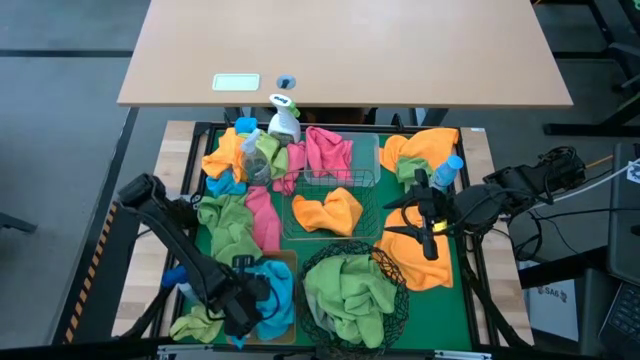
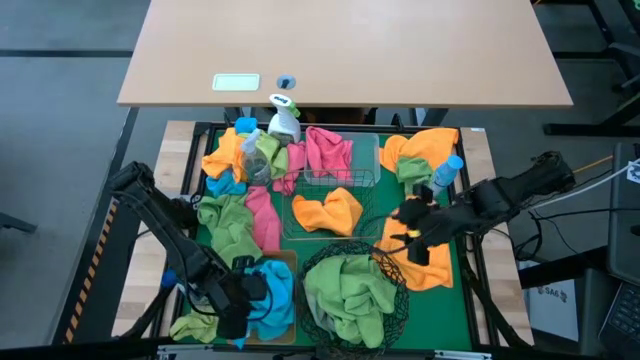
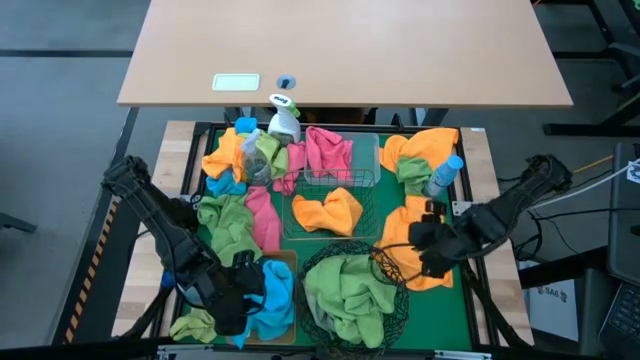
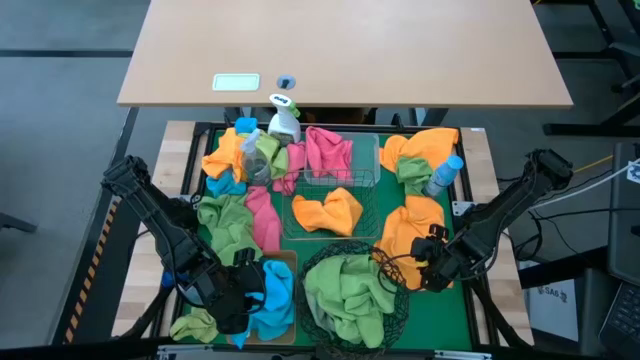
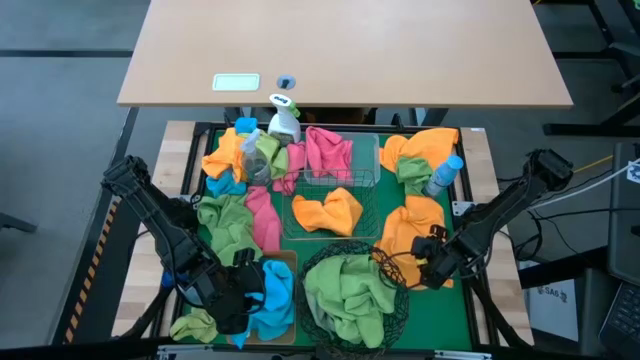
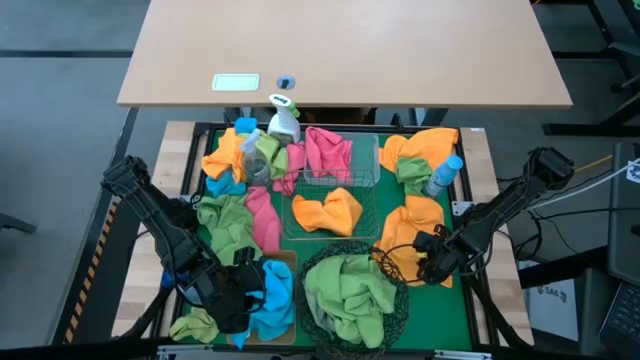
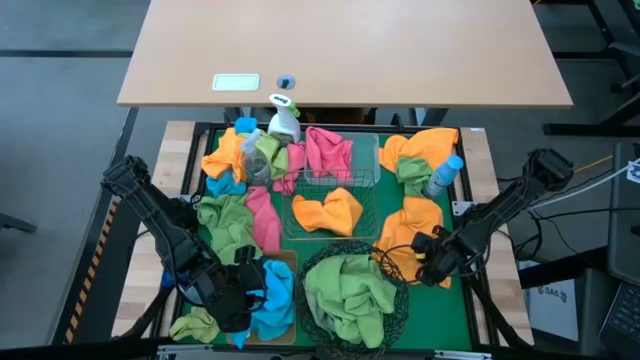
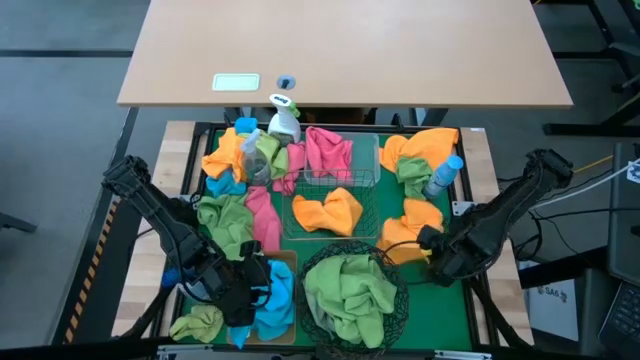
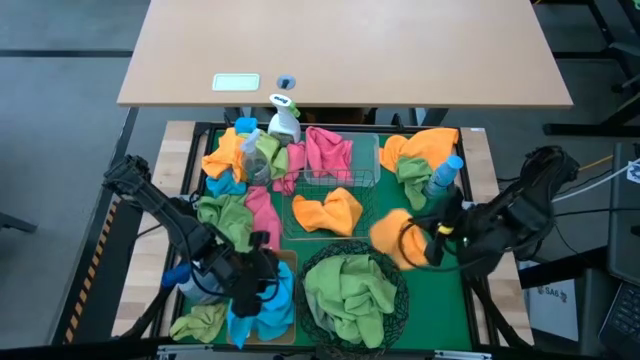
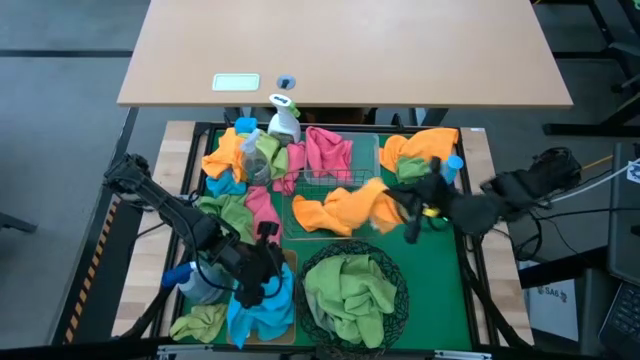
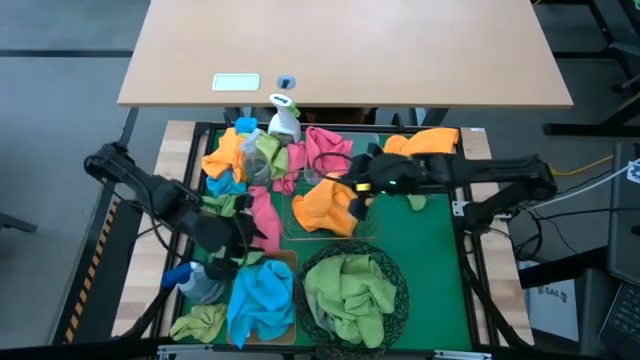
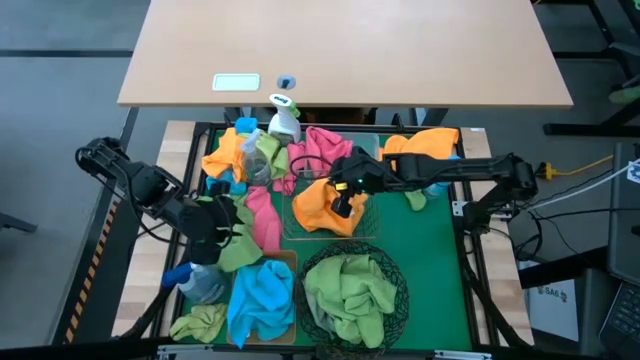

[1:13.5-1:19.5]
Task: Sort microfiber towel by color & place in baskets
Put the orange microfiber towel into the gold wire basket

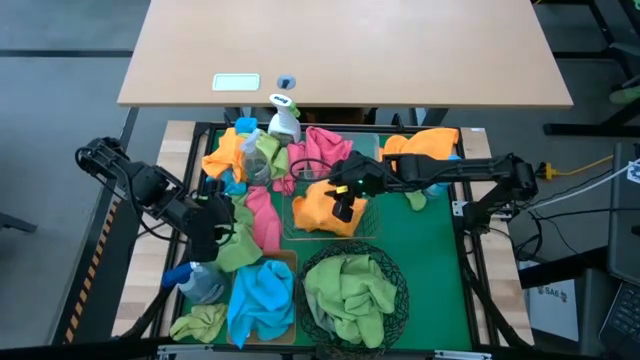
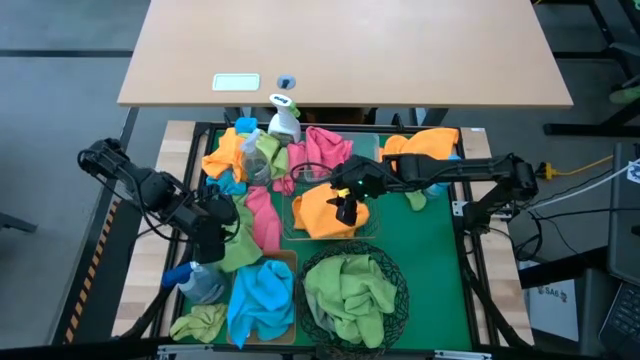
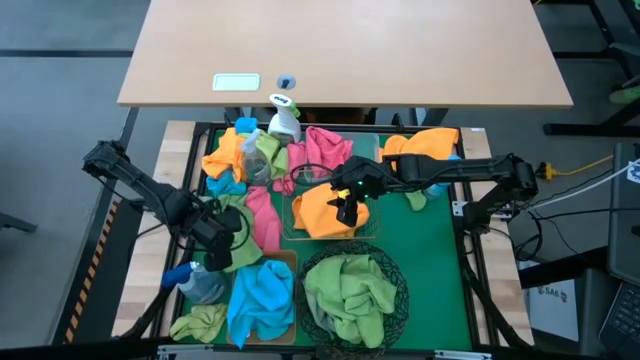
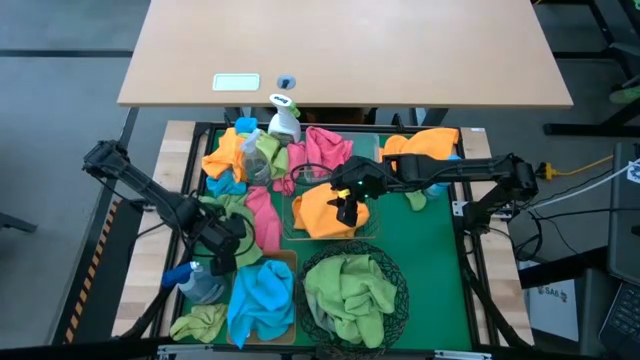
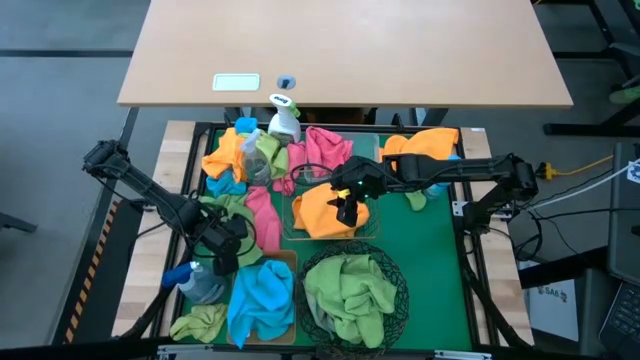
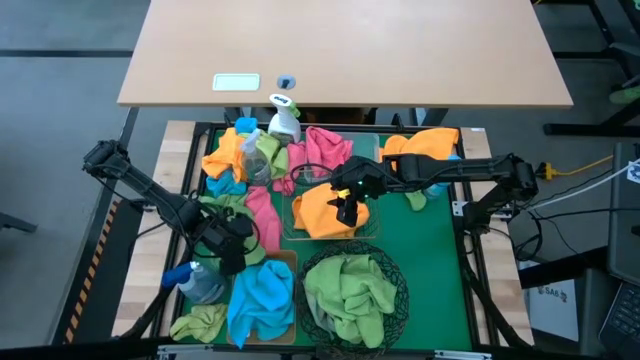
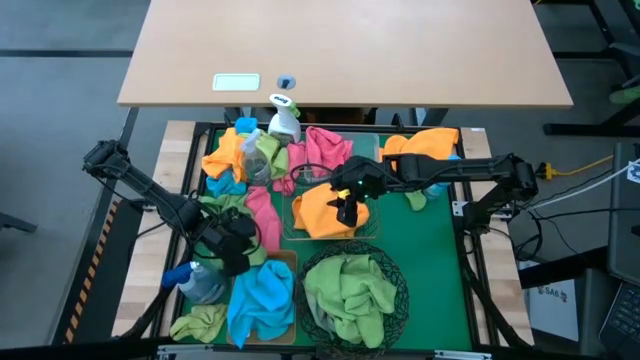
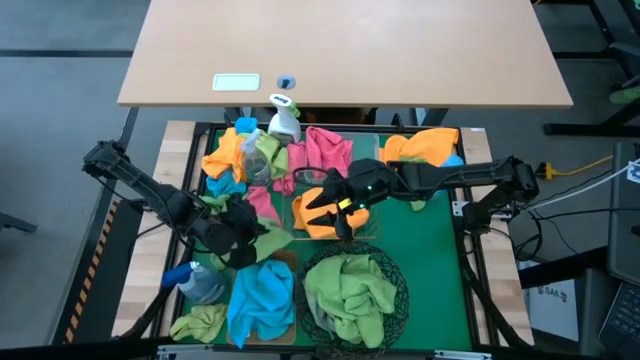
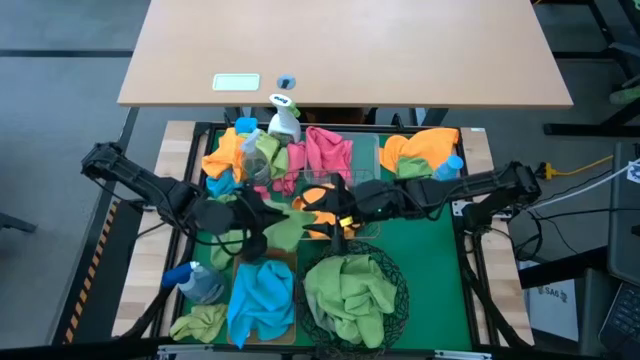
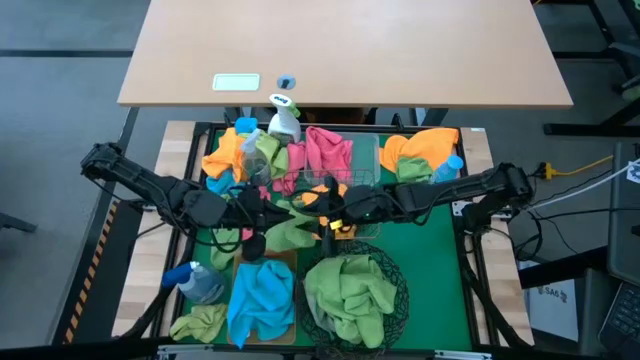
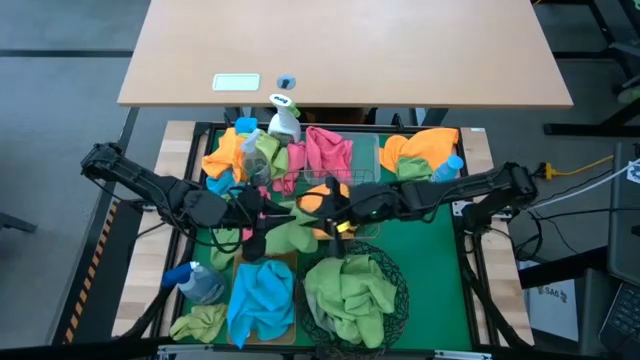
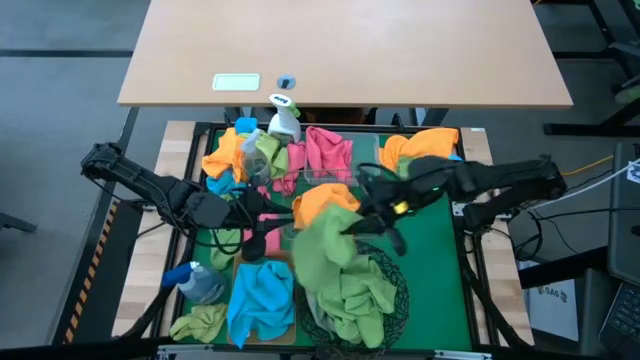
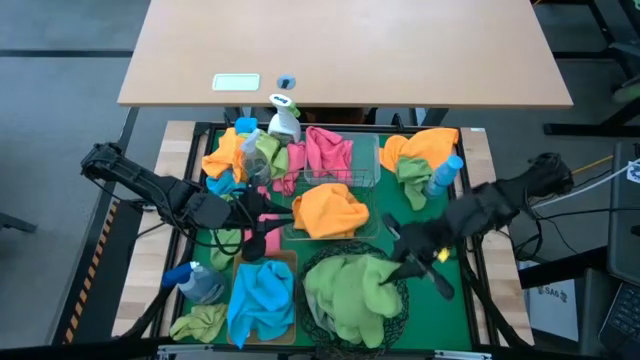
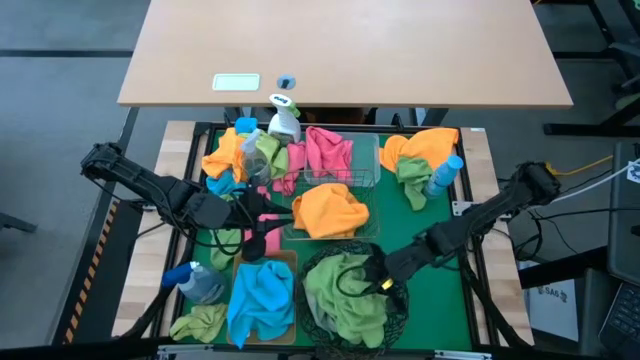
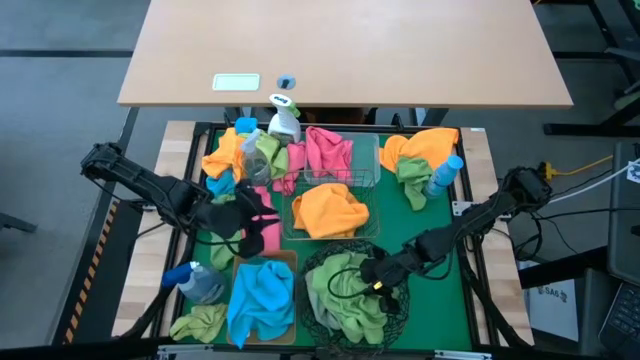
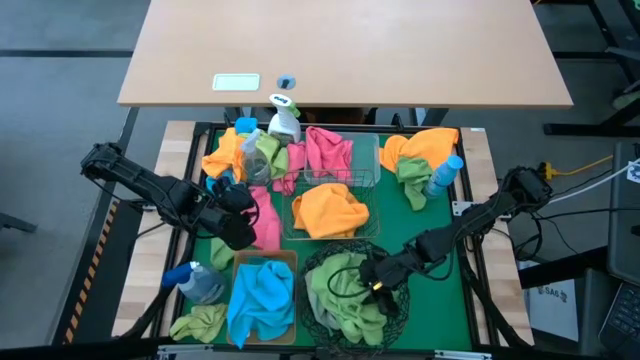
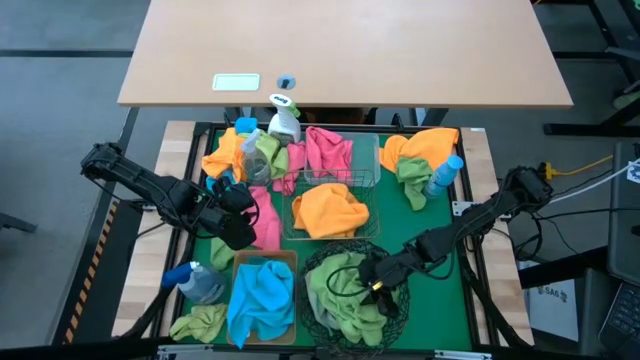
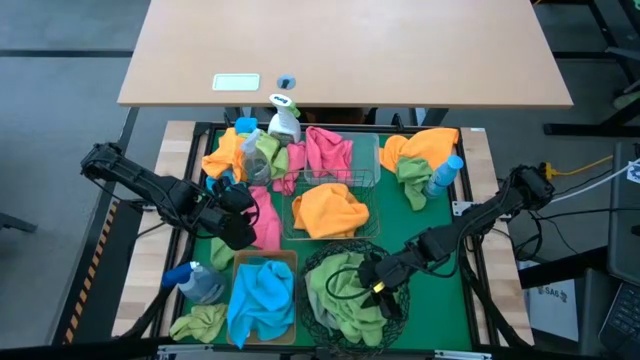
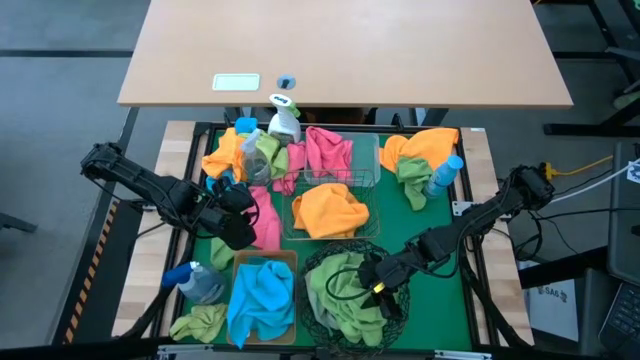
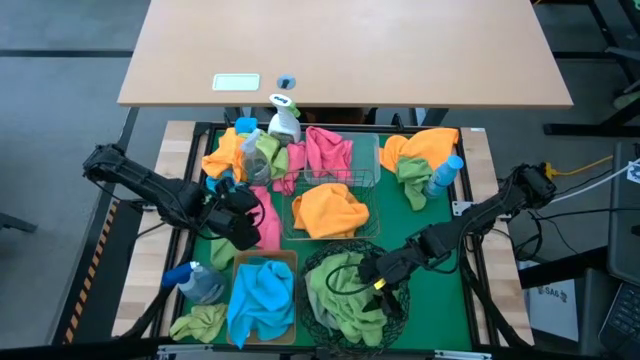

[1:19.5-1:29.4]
Put the green microfiber towel into the black wire basket

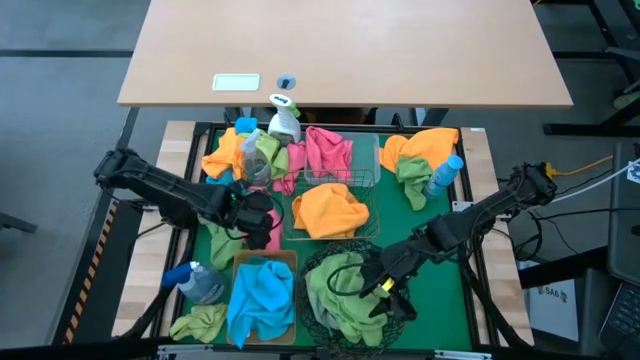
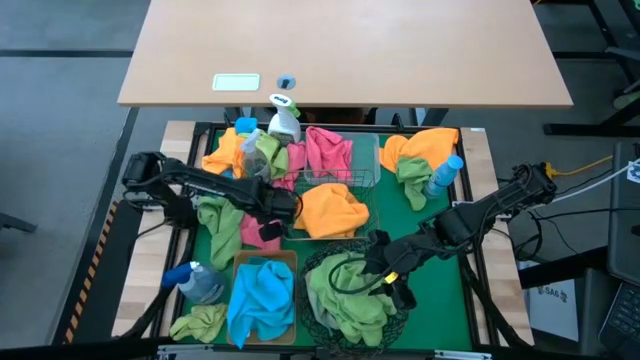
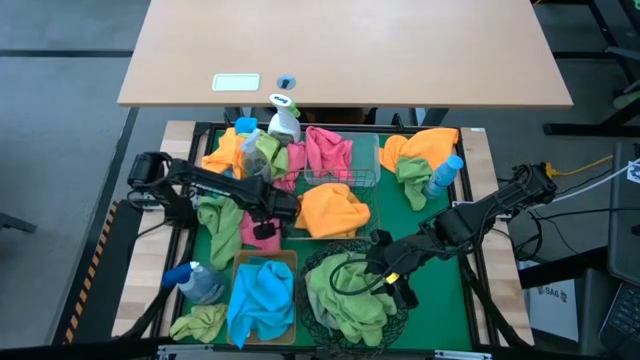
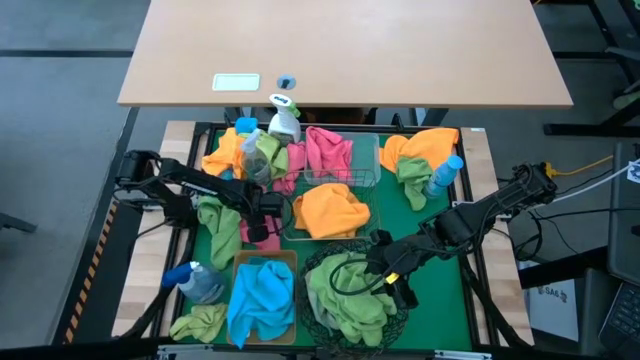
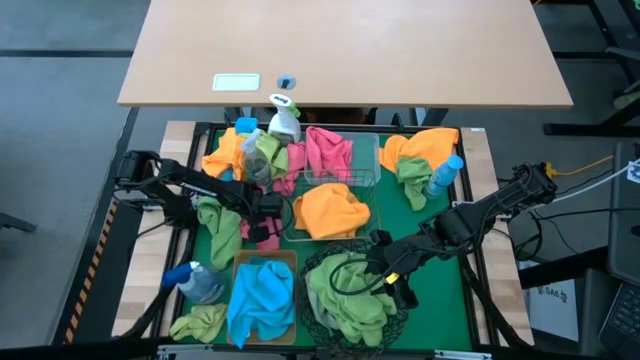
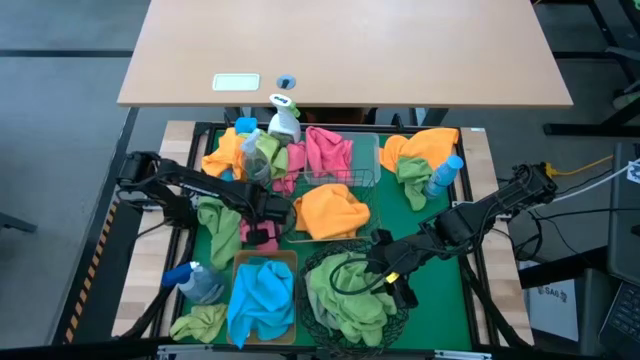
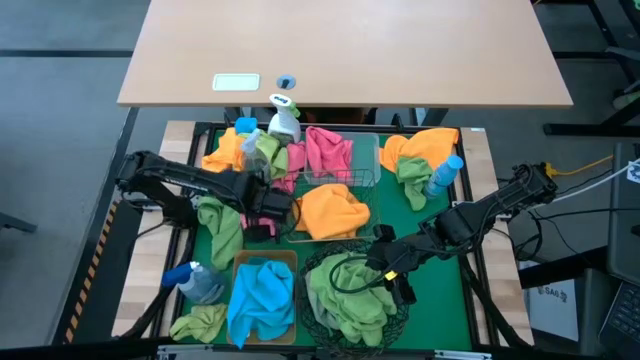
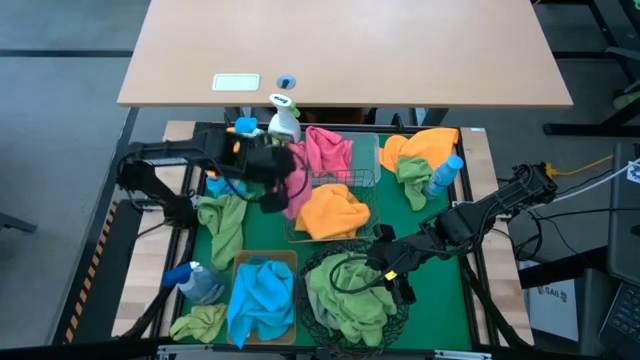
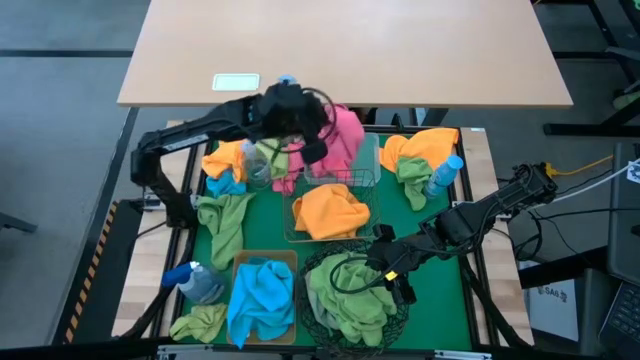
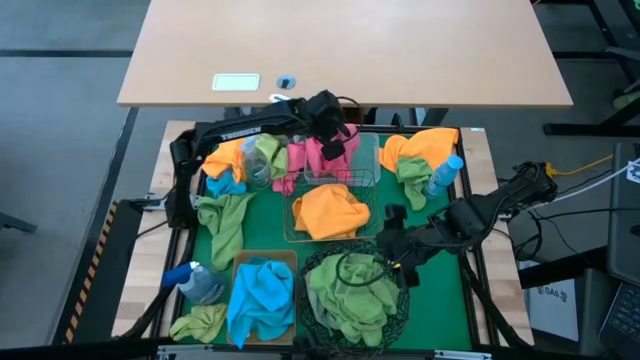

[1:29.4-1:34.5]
Put the pink microfiber towel into the transparent bin

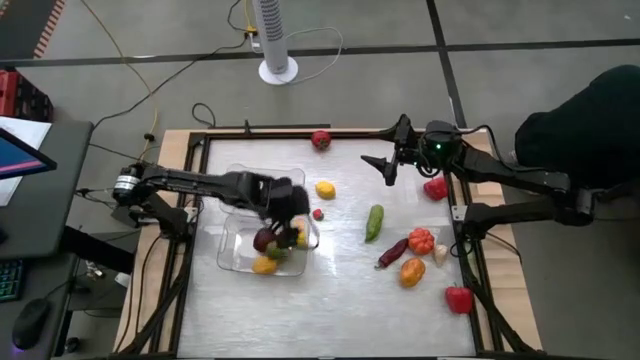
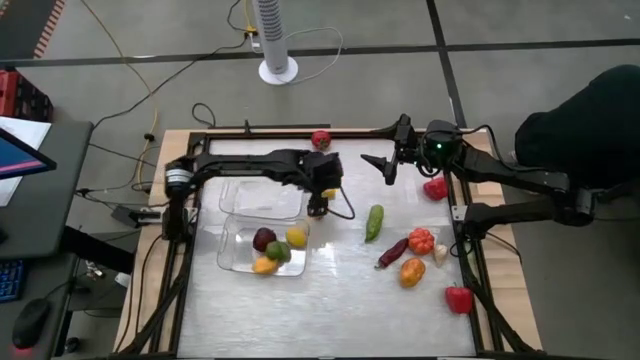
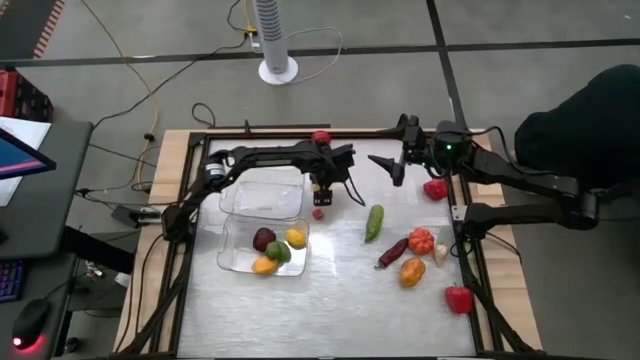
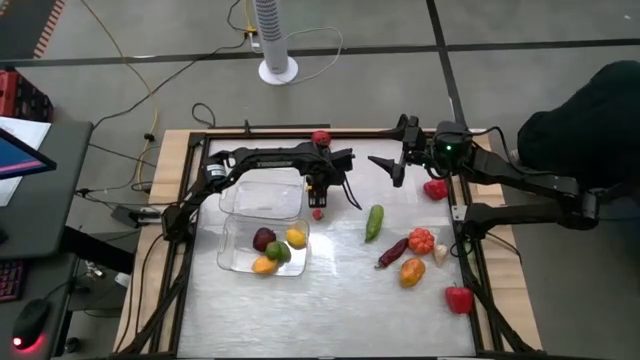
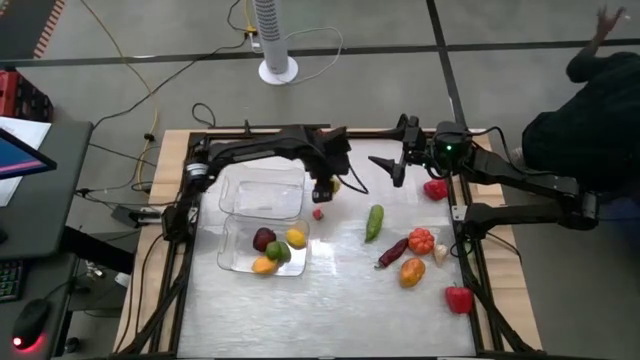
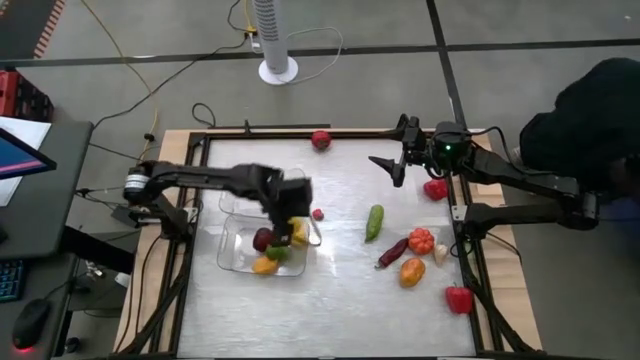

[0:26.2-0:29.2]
Task: Sort produce into baskets
Put the yellow lemon into the bottom transparent bin
